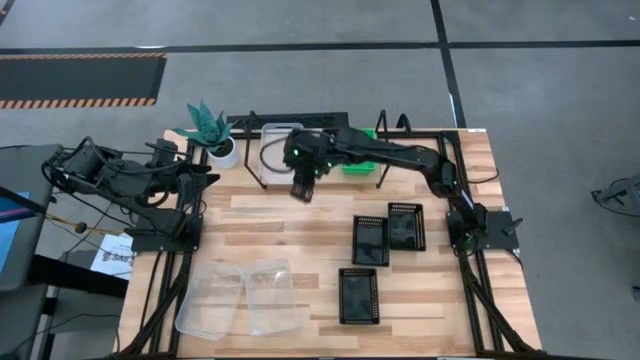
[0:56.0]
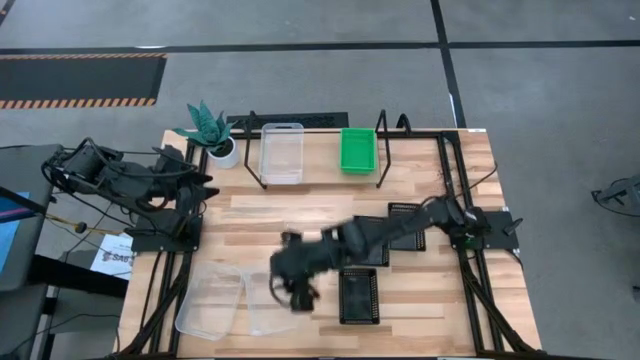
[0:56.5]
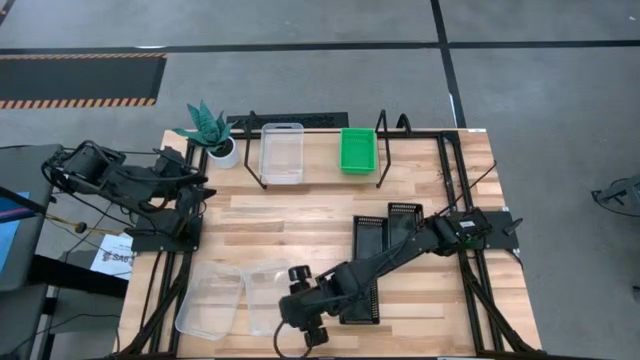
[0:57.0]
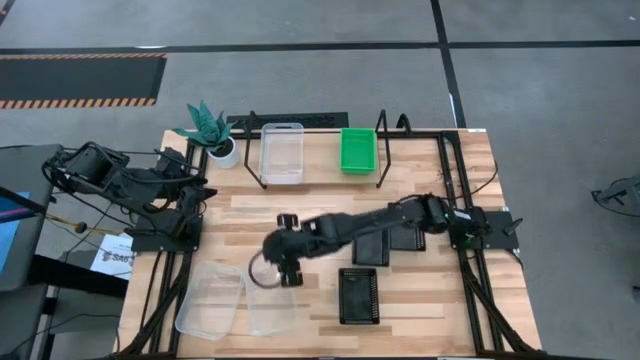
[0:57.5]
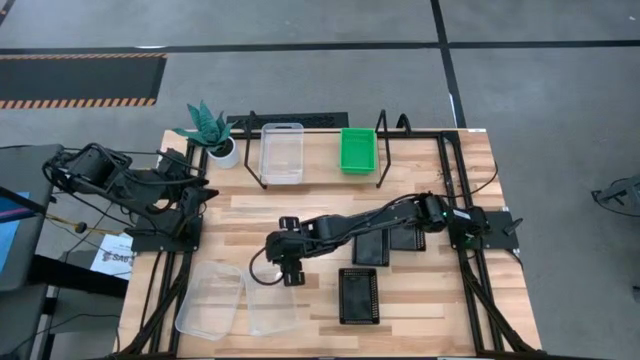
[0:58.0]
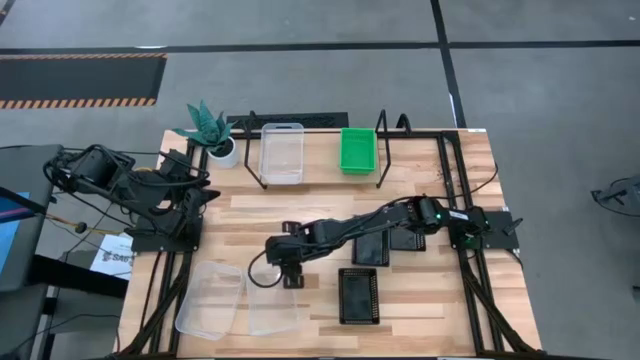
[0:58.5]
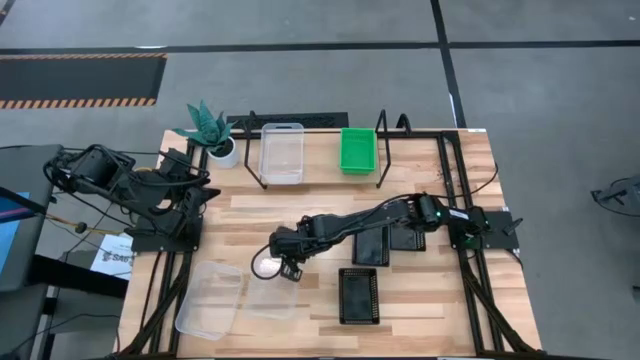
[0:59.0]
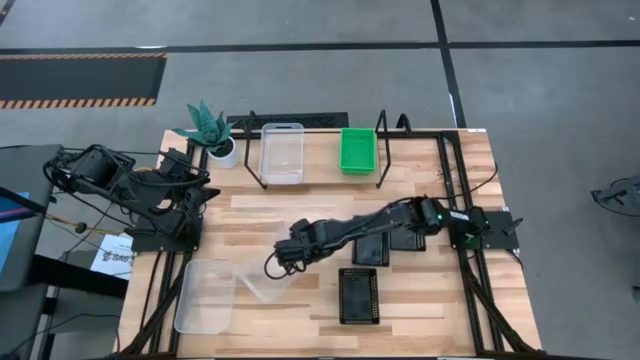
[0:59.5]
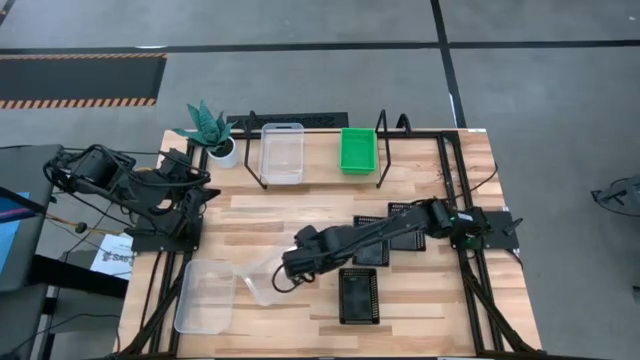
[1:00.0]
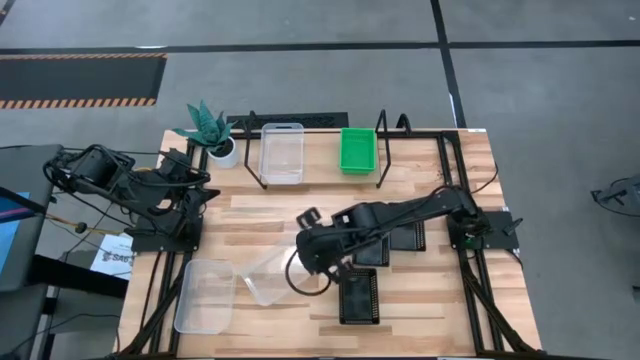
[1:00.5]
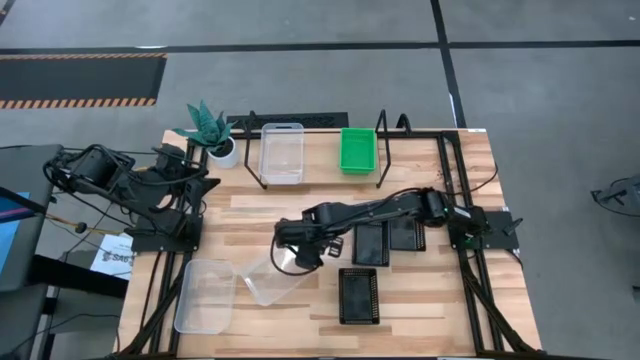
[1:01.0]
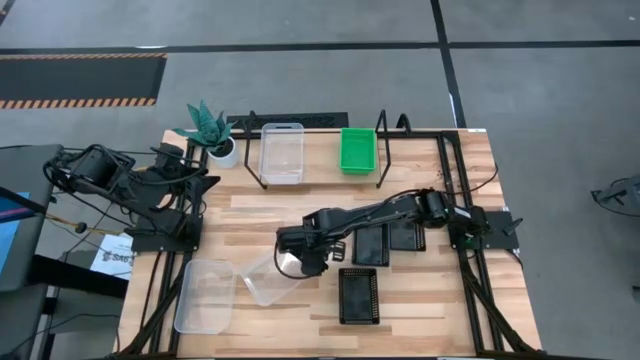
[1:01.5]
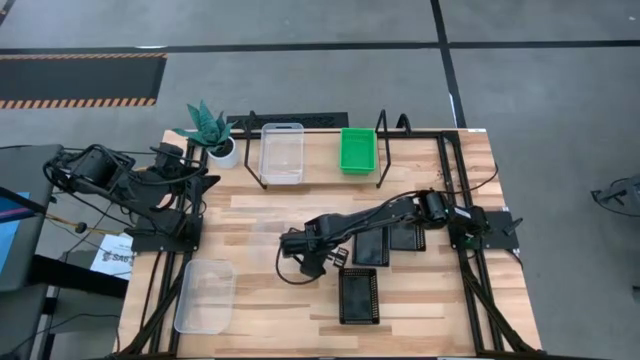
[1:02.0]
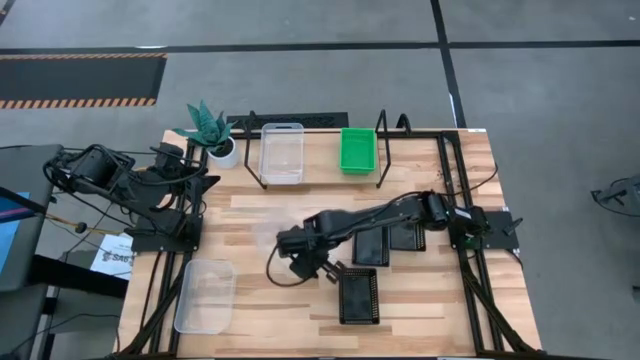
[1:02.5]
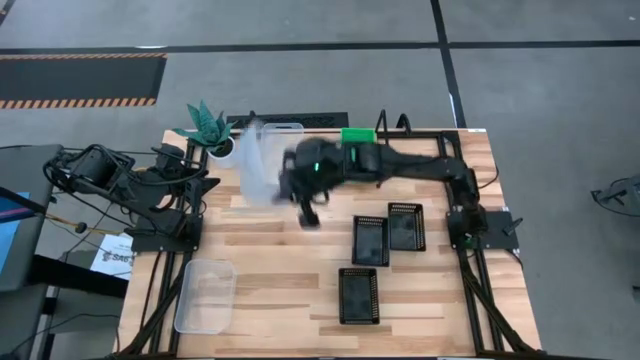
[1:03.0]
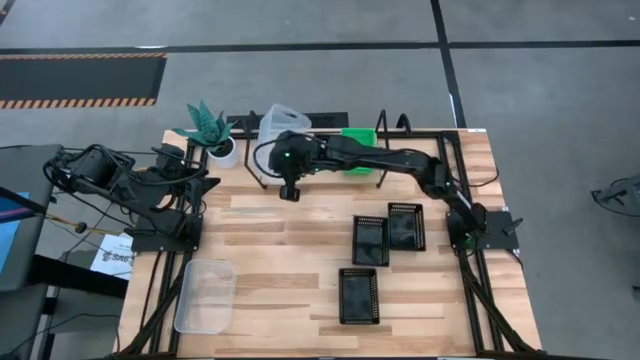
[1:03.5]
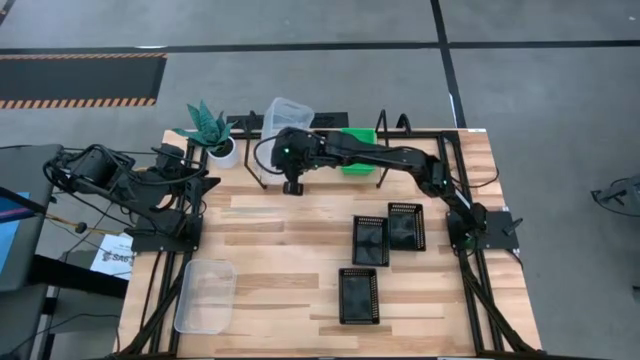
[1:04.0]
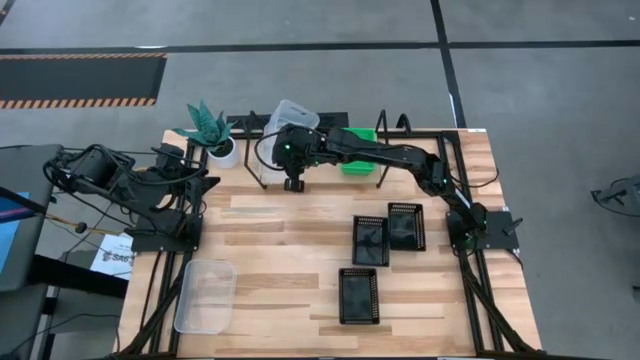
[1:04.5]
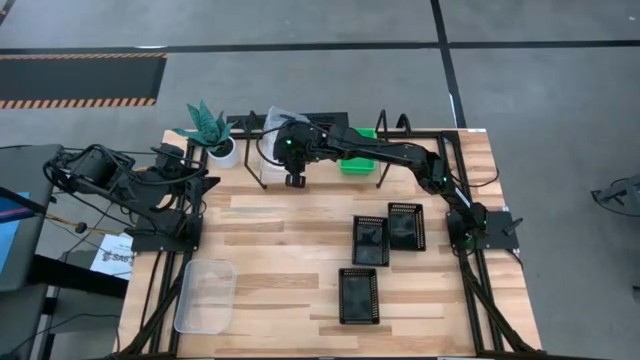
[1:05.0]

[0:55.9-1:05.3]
Task: Stack baskets on shelf by color
Stack the right transparent bin on top of the transparent bin on the shelf

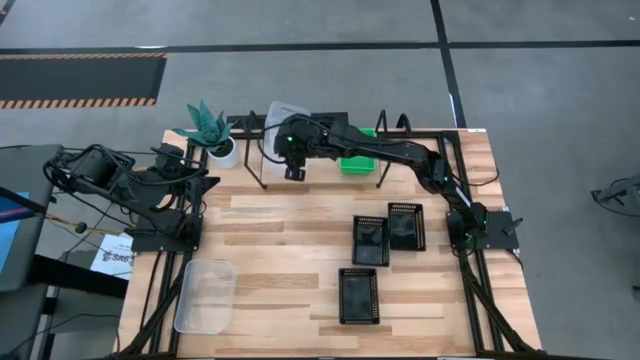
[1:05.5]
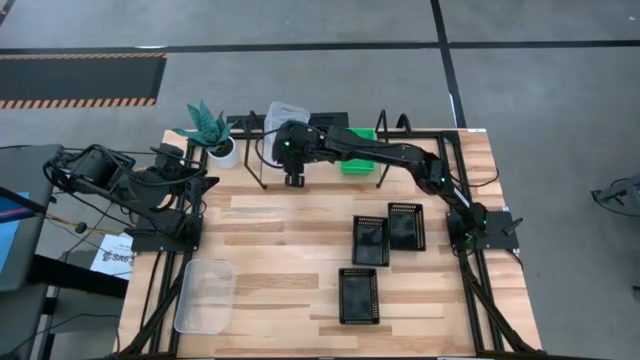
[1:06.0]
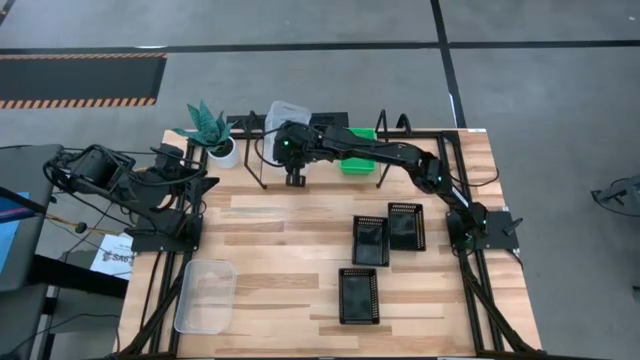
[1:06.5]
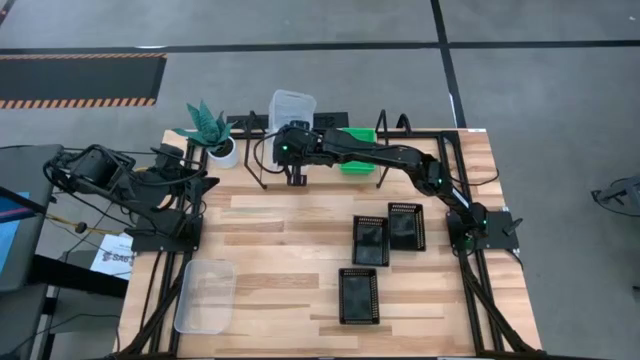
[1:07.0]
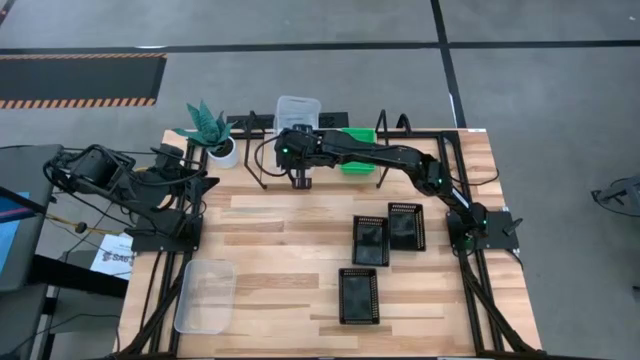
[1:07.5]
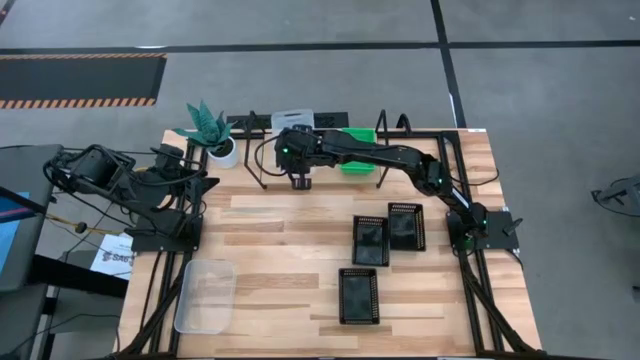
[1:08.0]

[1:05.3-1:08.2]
Stack the right transparent bin on top of the transparent bin on the shelf

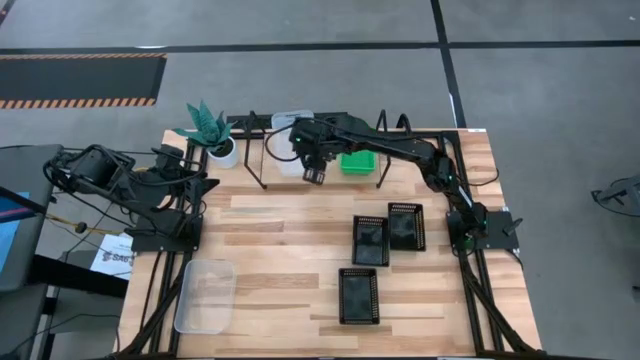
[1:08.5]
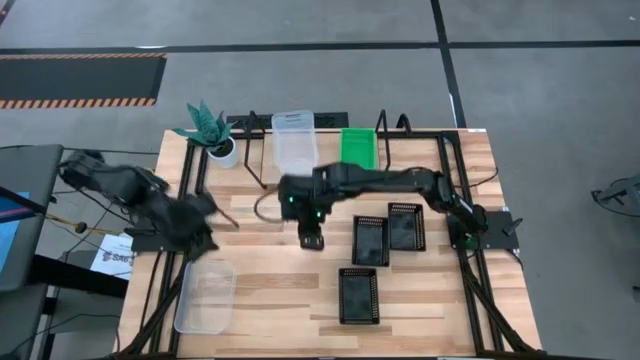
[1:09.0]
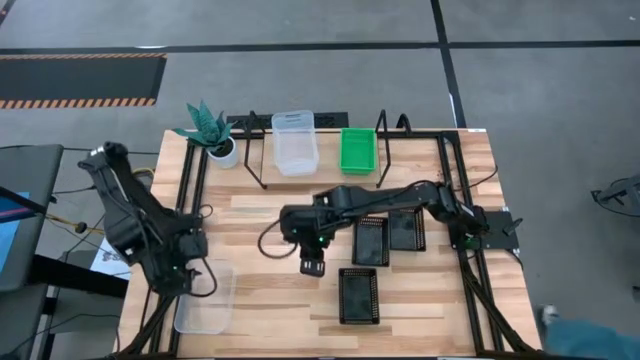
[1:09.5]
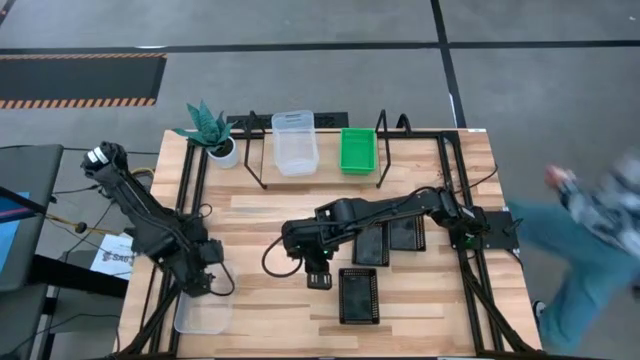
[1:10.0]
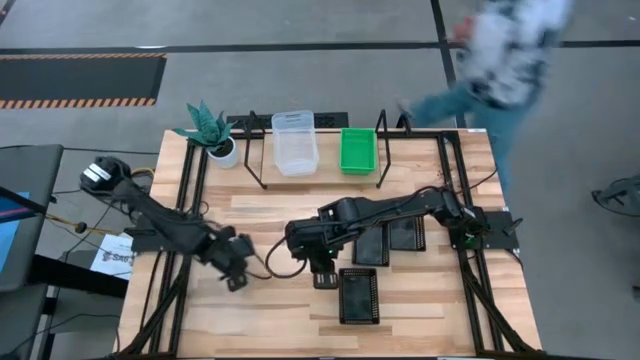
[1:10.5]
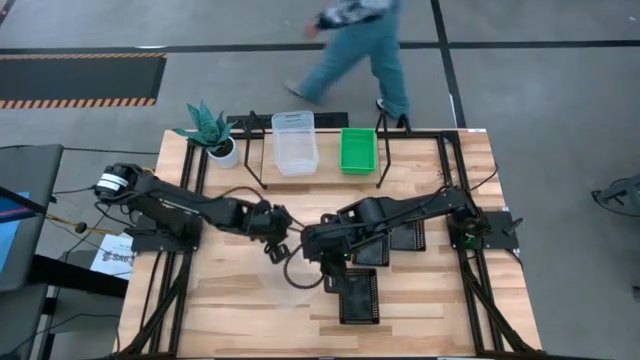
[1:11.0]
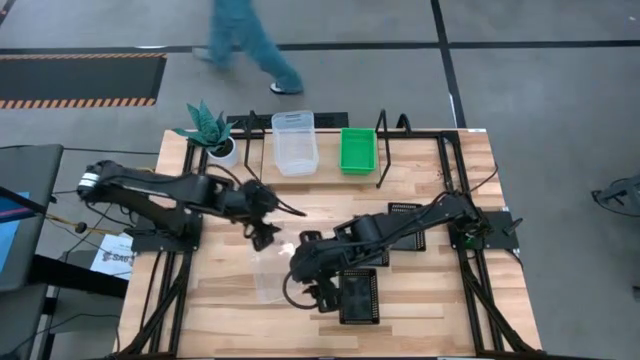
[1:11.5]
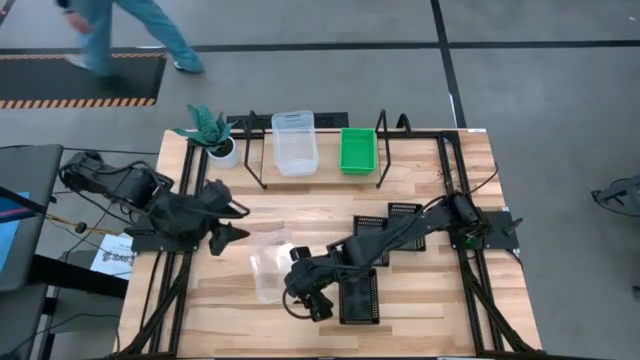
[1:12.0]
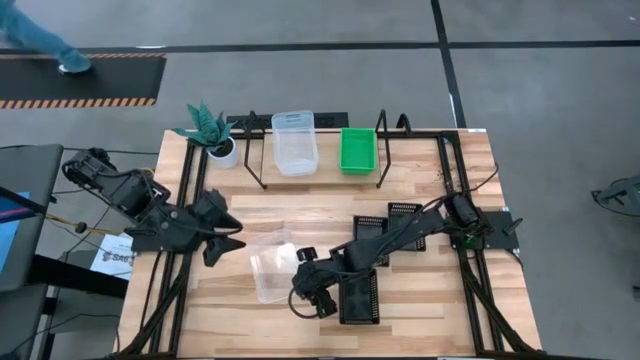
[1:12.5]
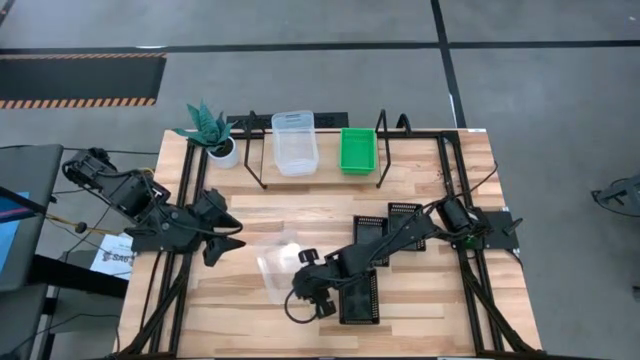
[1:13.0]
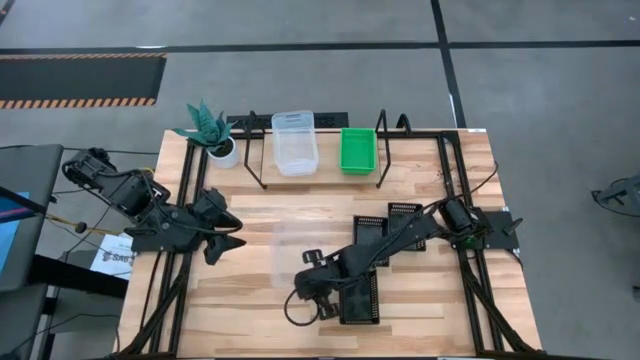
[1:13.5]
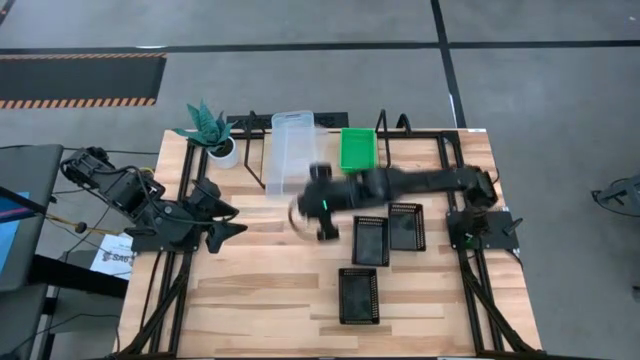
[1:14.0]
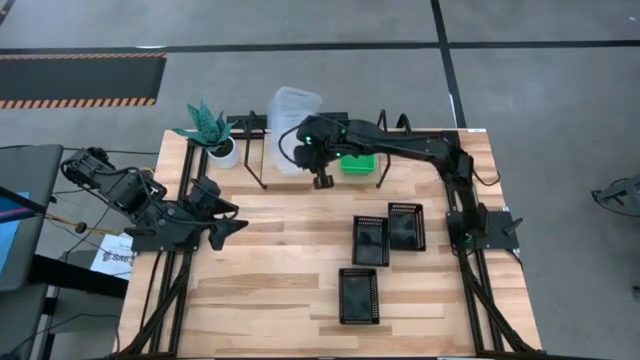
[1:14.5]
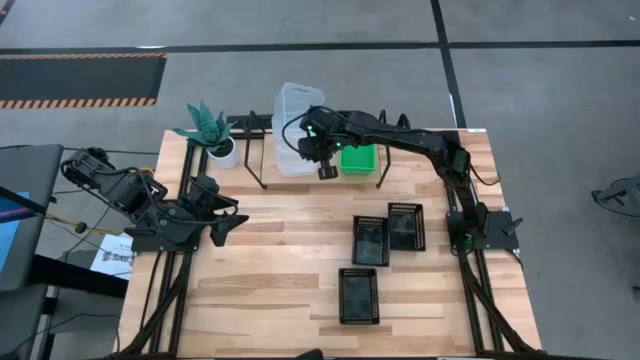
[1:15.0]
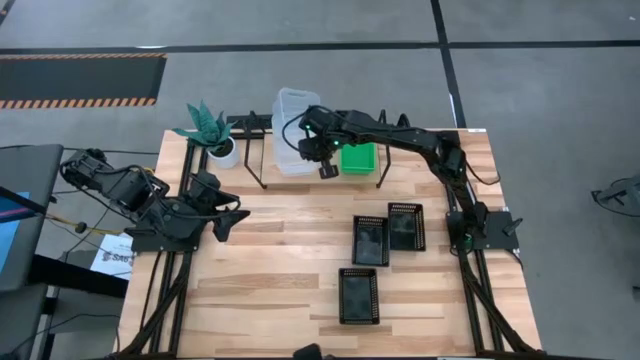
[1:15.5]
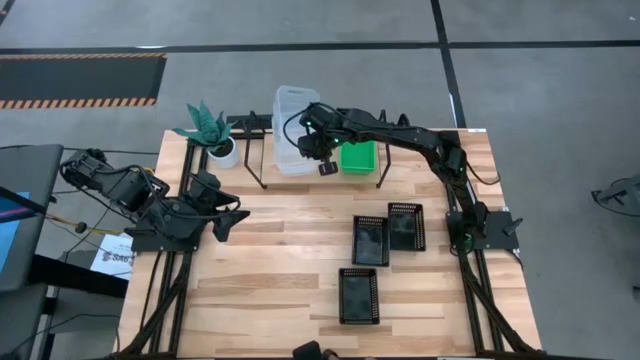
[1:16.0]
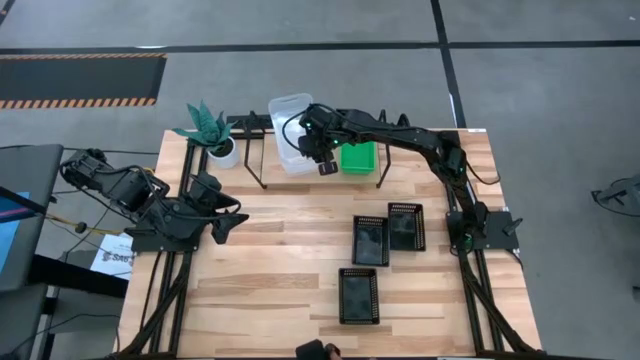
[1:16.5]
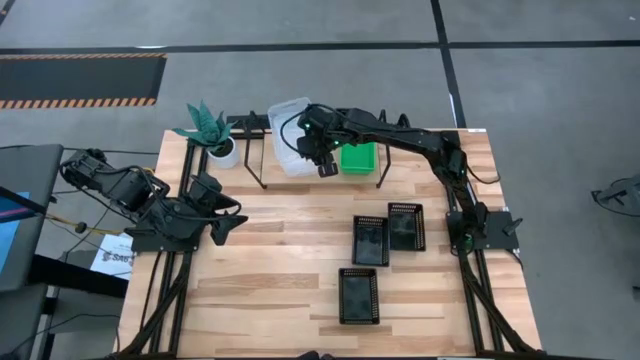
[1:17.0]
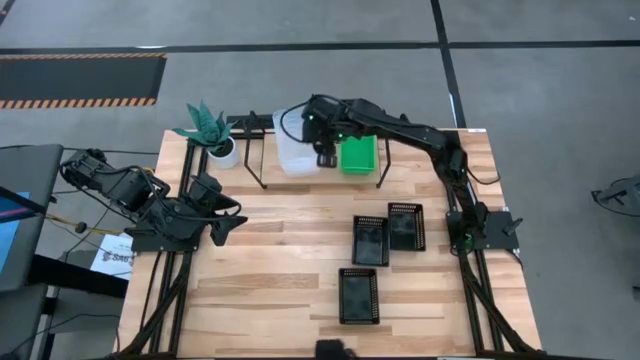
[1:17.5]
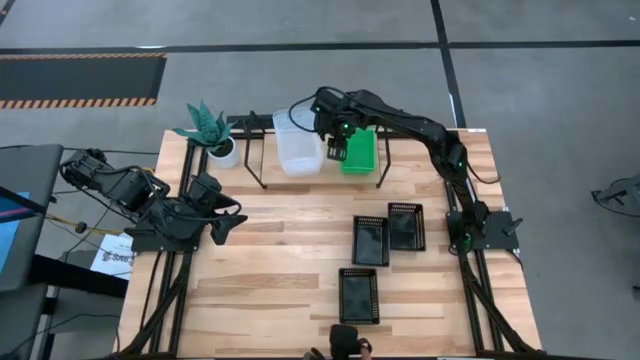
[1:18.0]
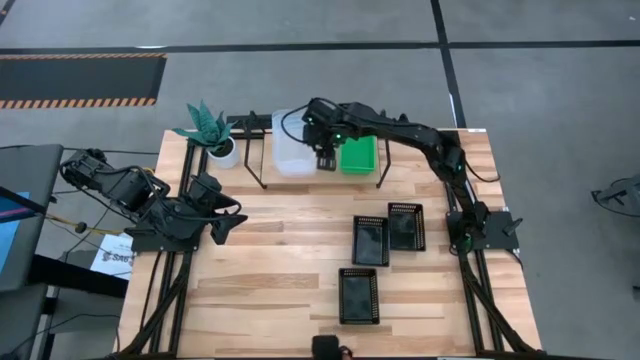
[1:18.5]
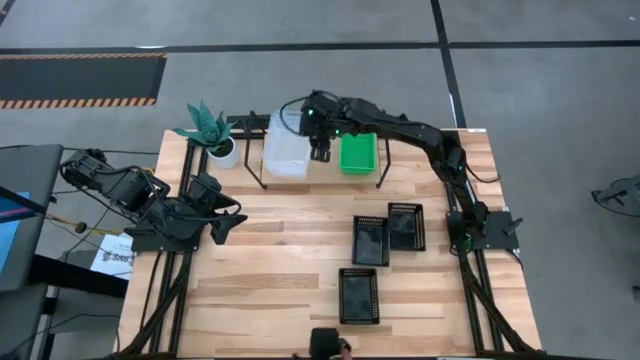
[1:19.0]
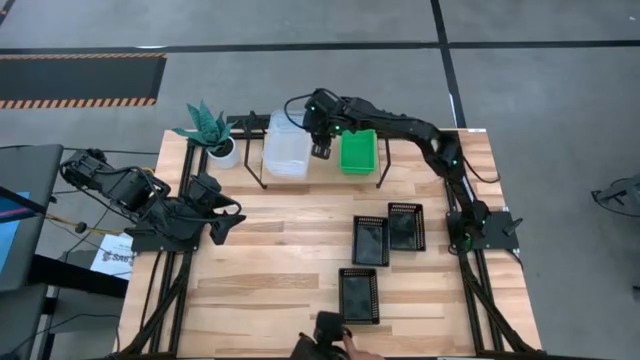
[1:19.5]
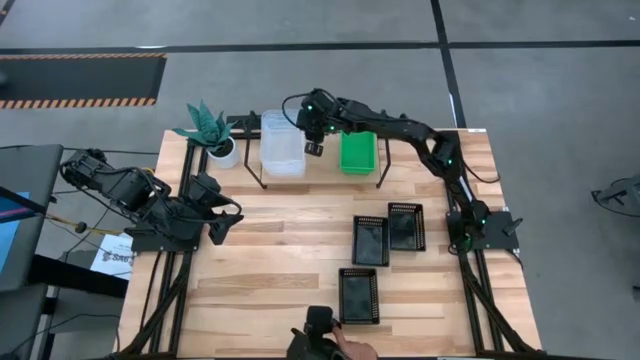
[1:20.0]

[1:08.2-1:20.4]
Stack the transparent bin on top of the stacked transparent bins on the shelf
